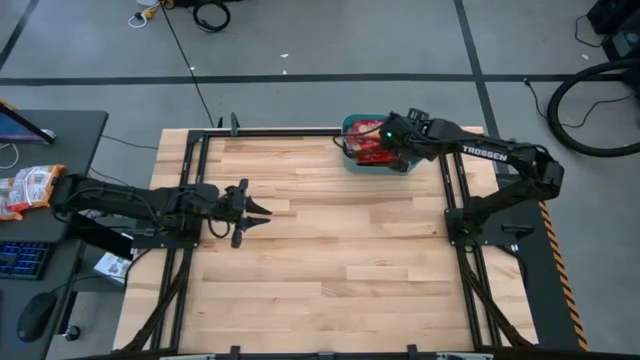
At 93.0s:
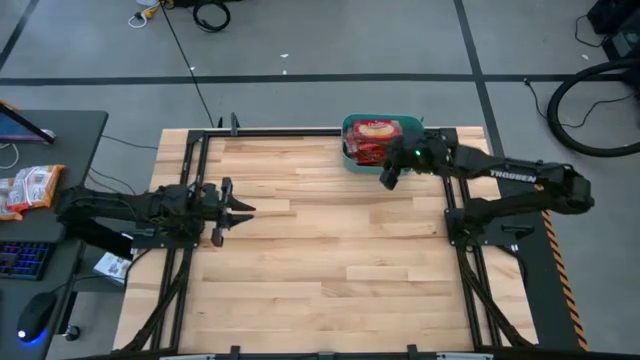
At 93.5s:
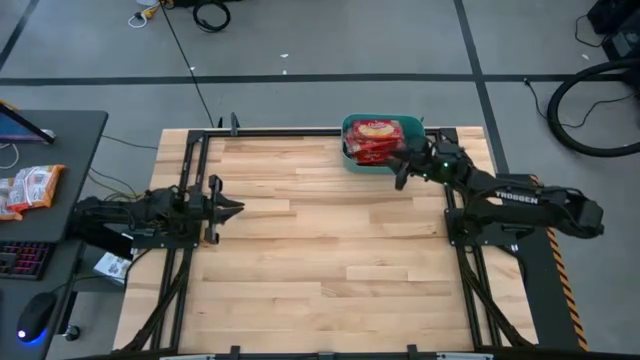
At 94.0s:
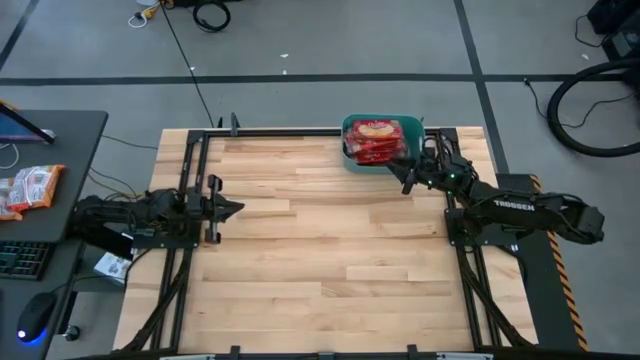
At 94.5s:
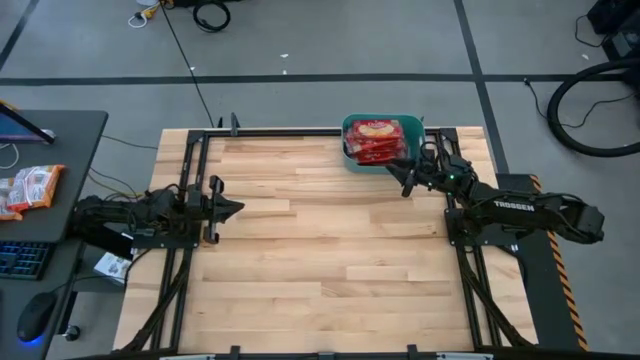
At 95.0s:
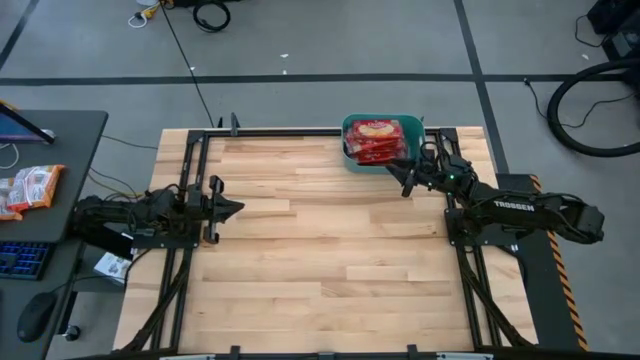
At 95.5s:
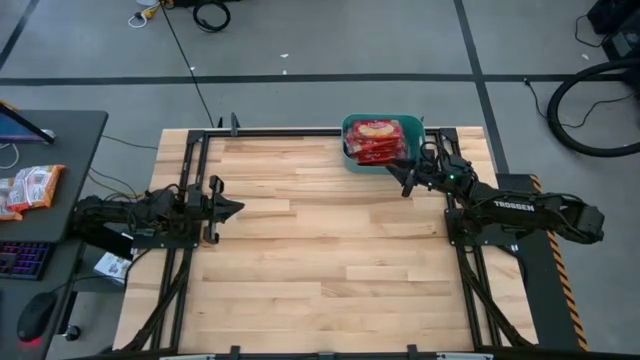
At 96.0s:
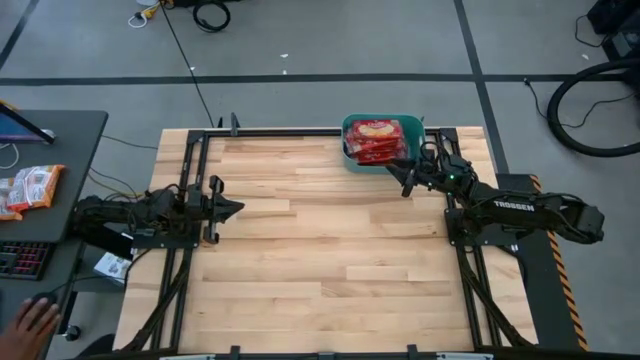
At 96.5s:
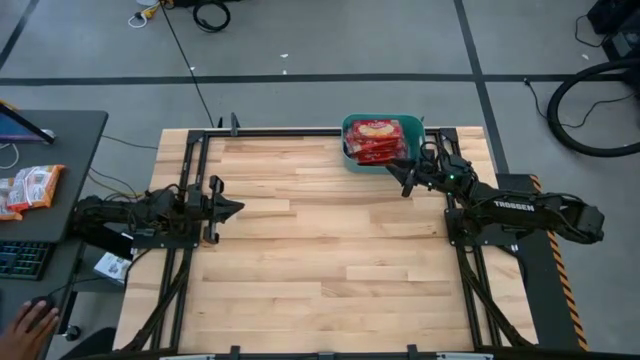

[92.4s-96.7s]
Task: Sort popcorn bags into baskets
Return to Home Position

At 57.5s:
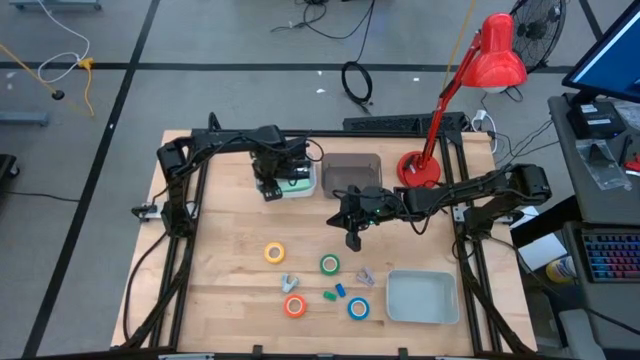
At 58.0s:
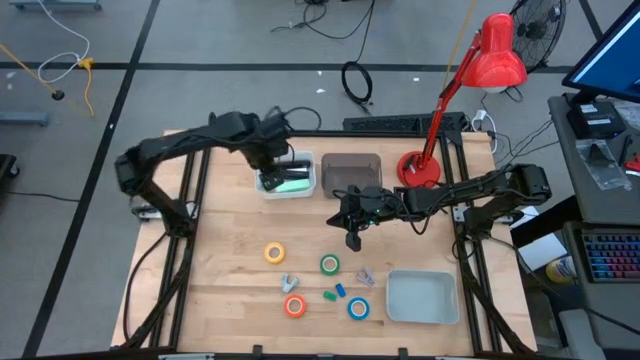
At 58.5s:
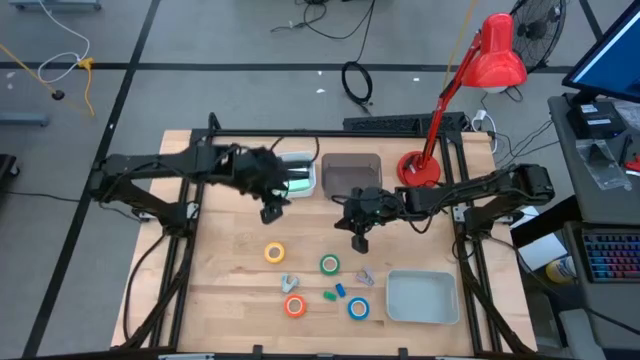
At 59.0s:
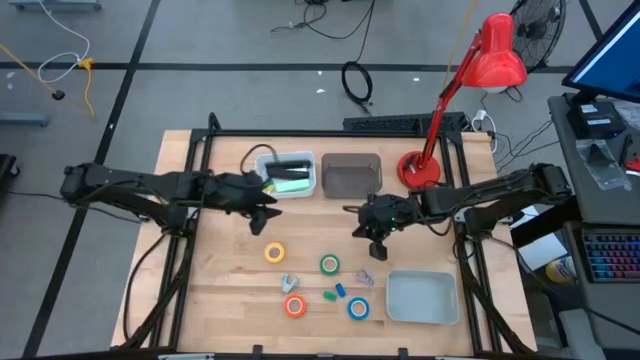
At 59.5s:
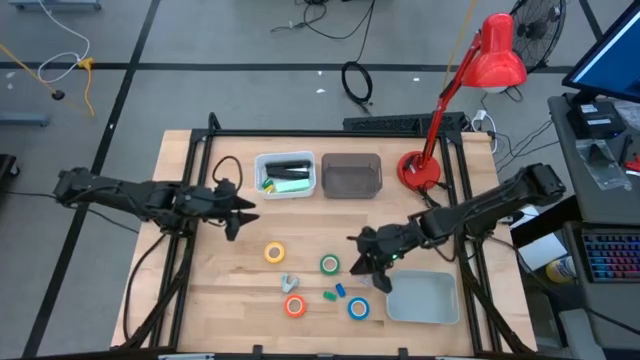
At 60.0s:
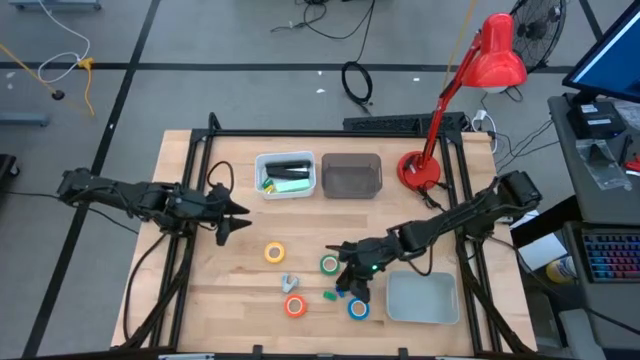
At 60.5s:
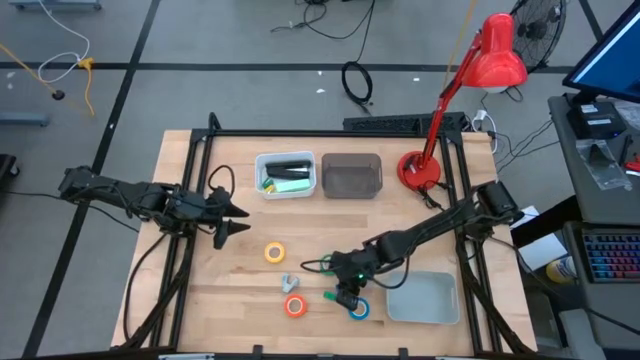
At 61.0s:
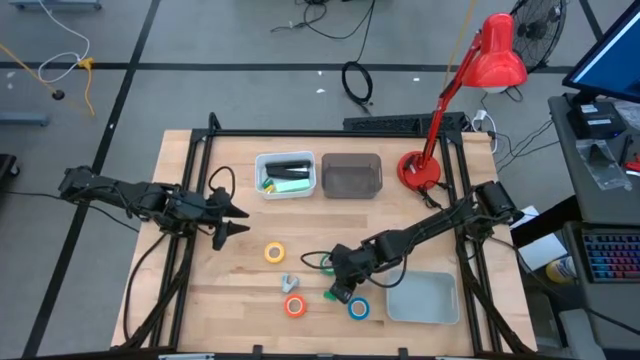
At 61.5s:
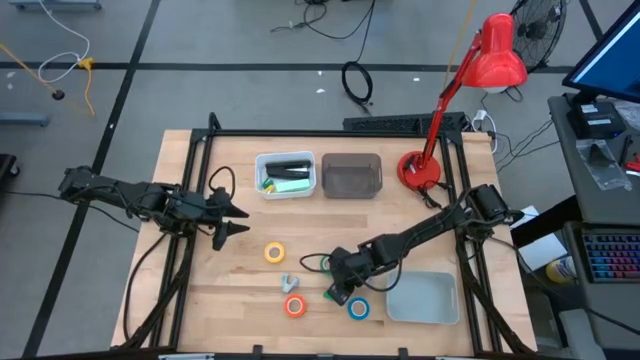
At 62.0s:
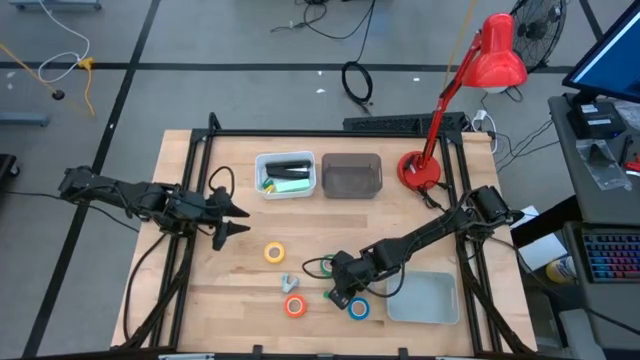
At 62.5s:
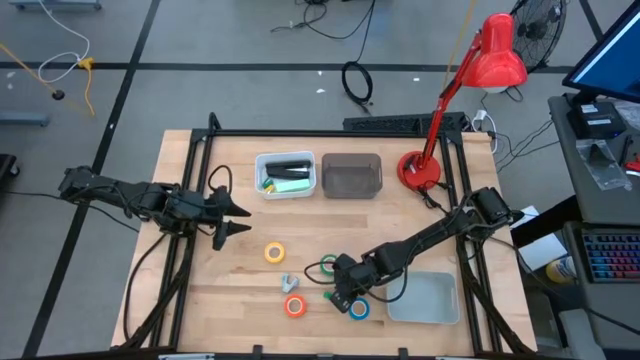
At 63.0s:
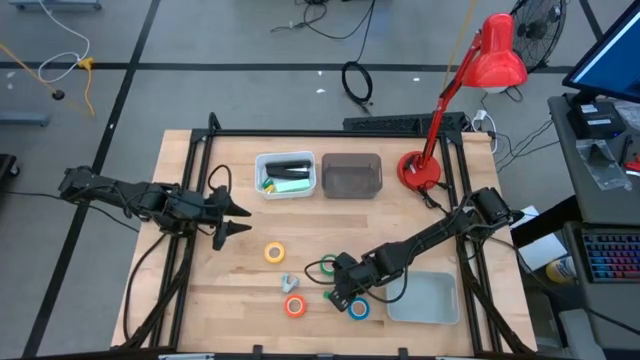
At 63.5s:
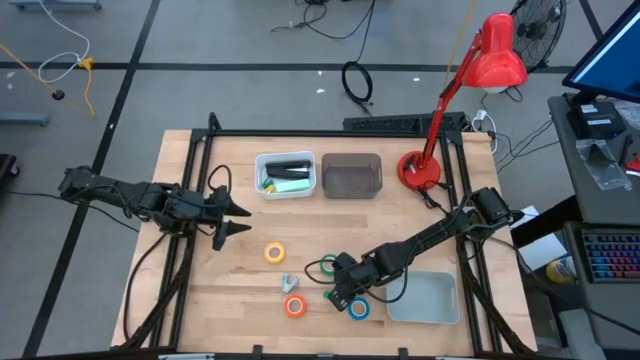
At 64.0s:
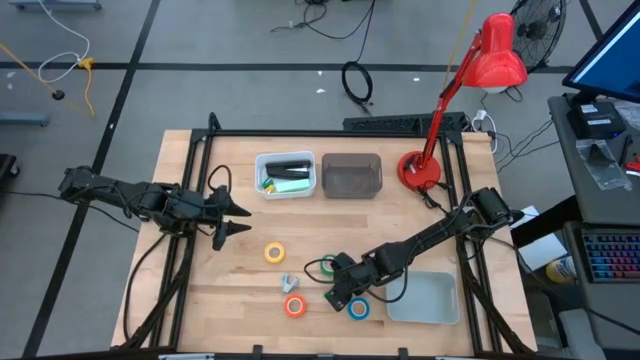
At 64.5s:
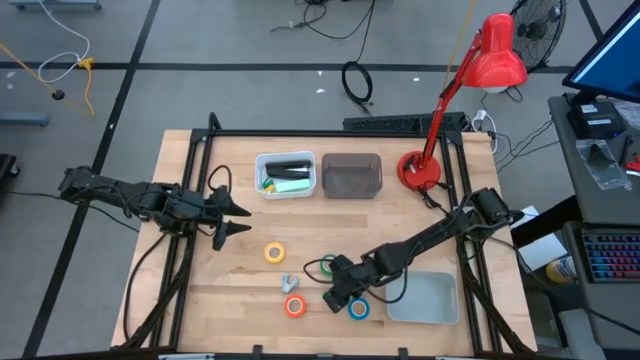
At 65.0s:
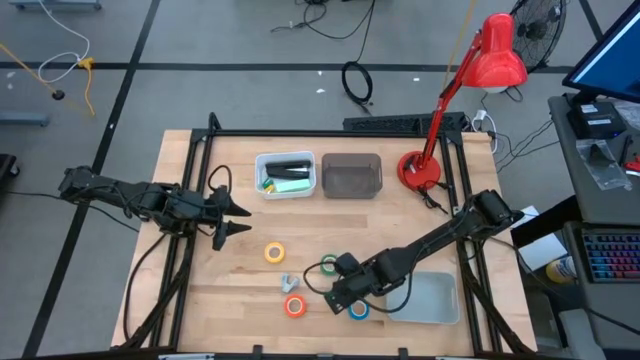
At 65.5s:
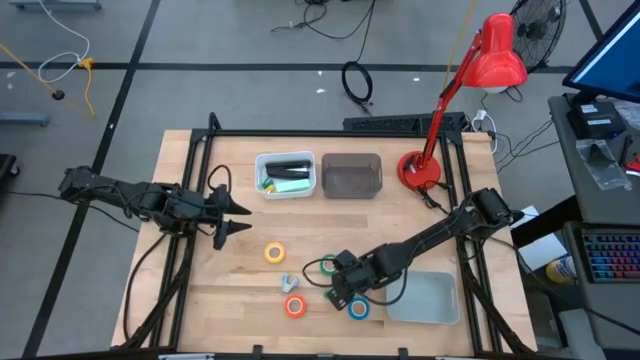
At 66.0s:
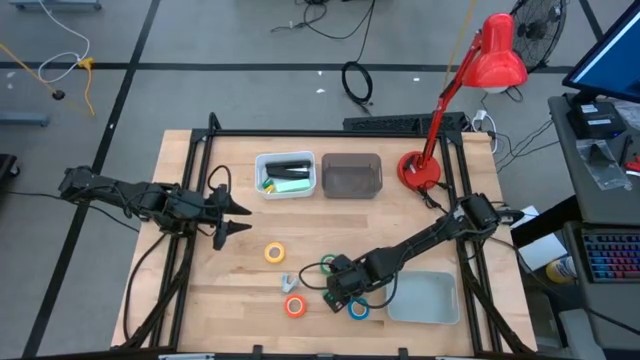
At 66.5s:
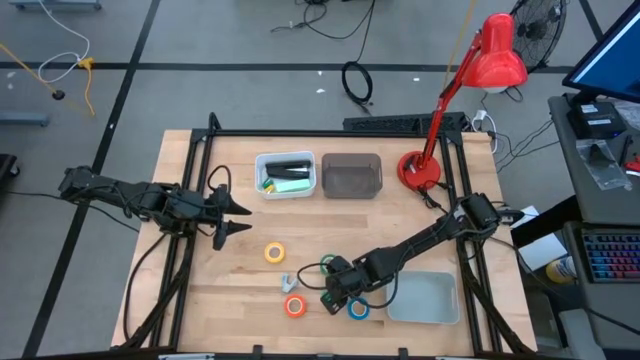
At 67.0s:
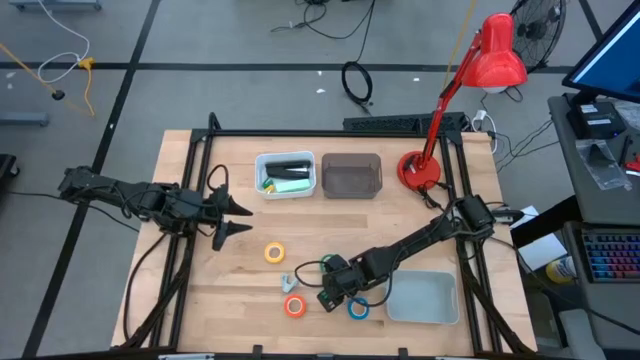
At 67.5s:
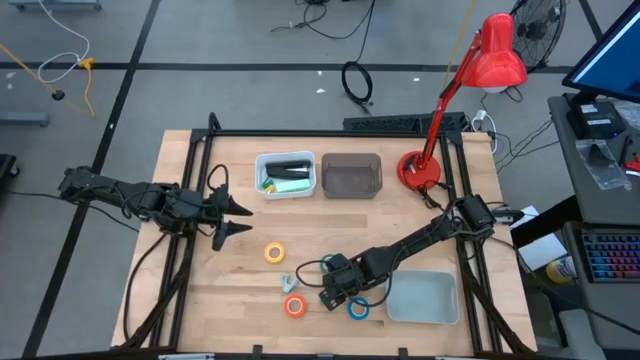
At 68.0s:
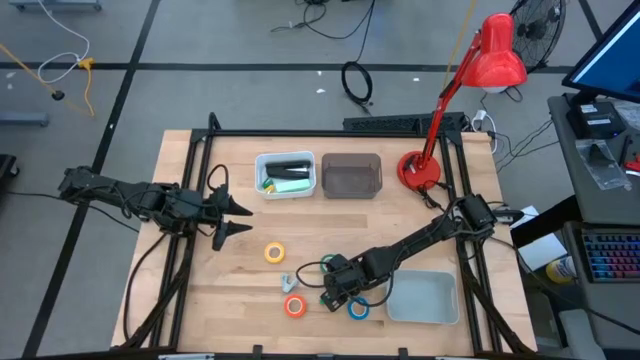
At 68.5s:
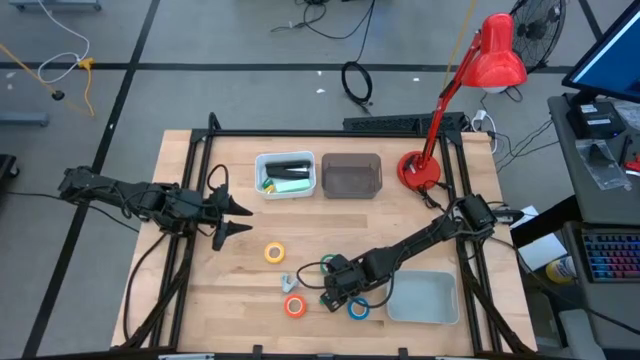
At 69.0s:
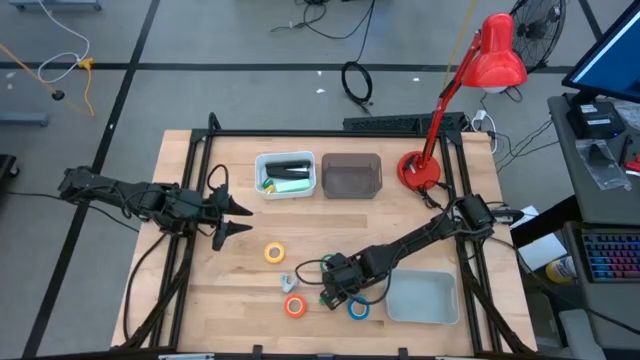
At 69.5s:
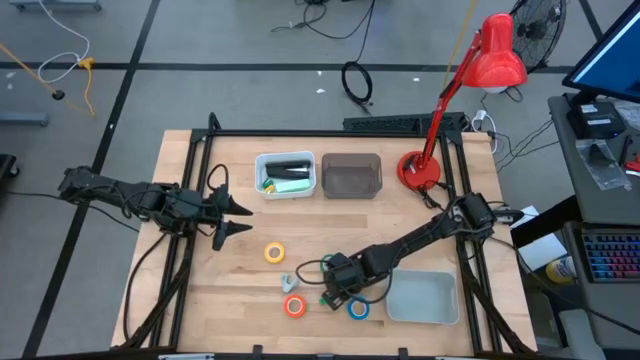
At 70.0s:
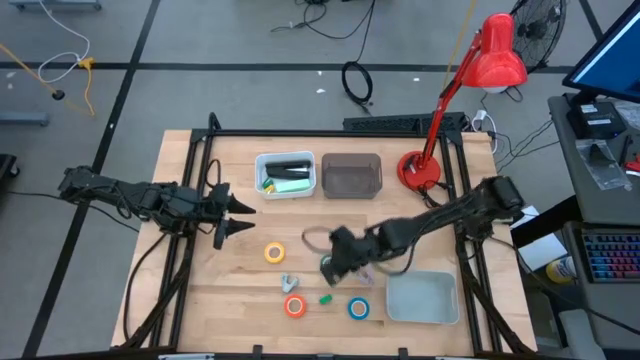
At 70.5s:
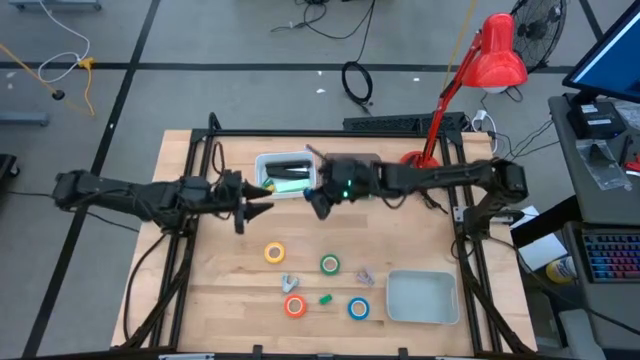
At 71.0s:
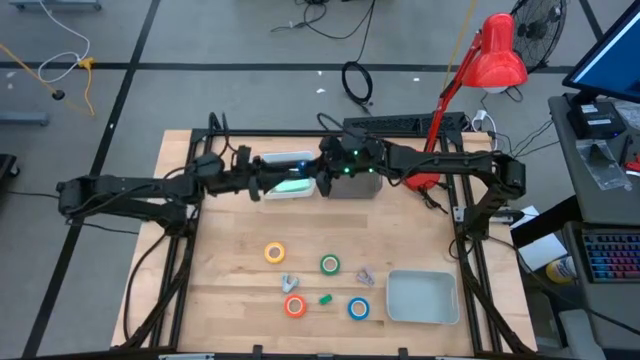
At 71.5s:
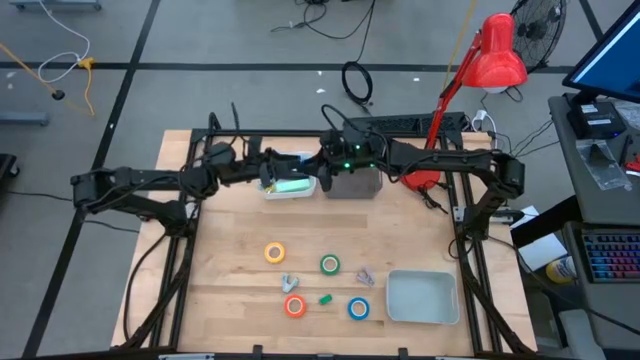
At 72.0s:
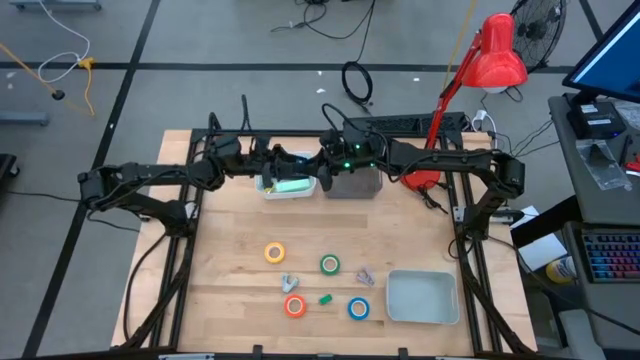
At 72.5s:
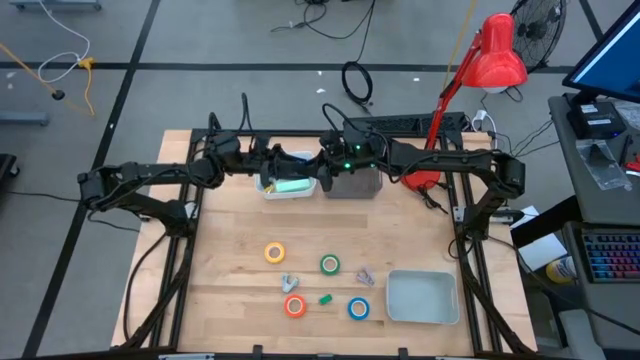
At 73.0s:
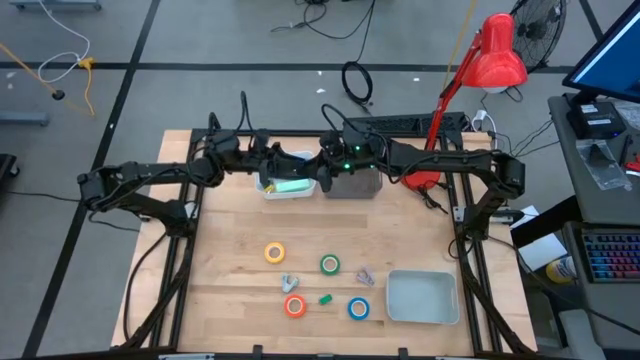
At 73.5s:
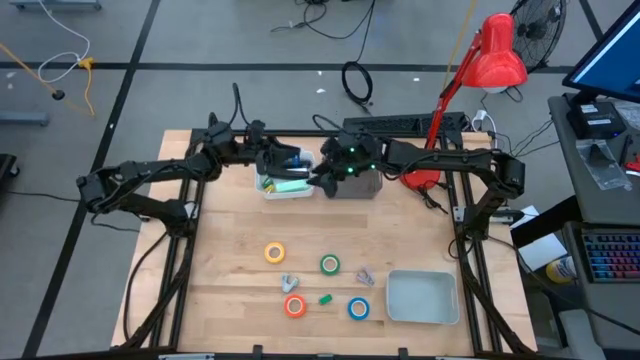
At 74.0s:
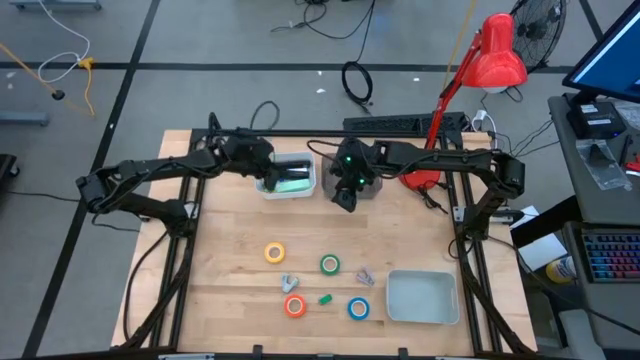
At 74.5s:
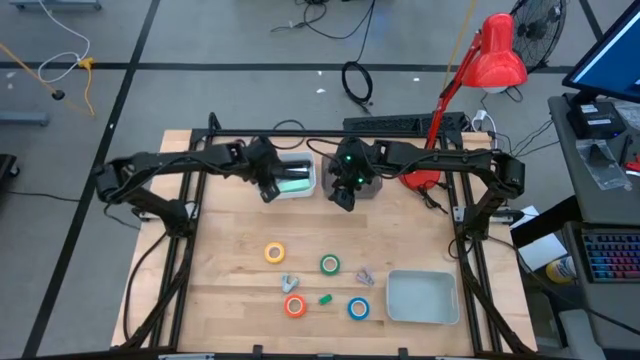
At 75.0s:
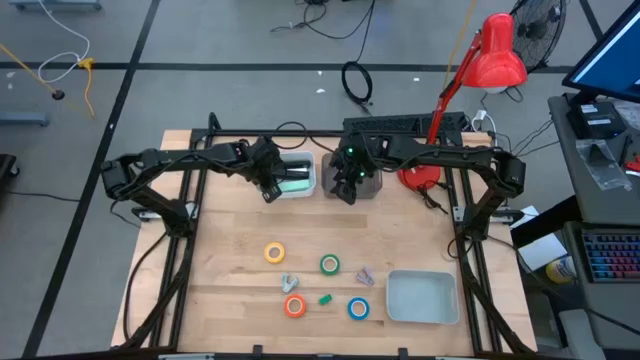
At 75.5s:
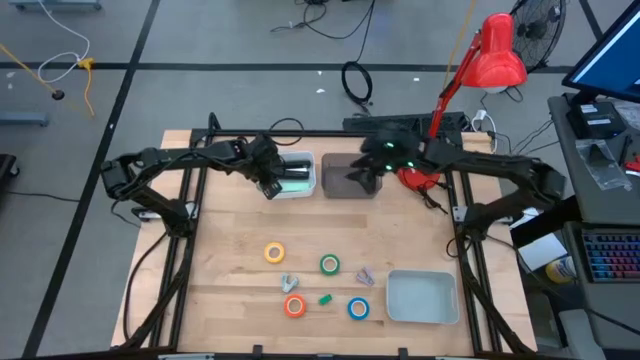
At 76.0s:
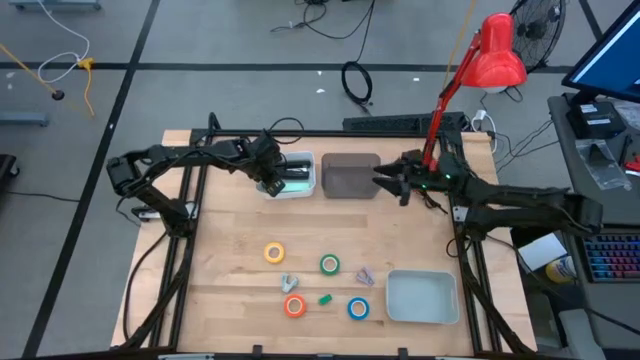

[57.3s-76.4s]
Task: Pick and place Stapler, Stapler remover, tape
Put the small blue stapler into the white bin
